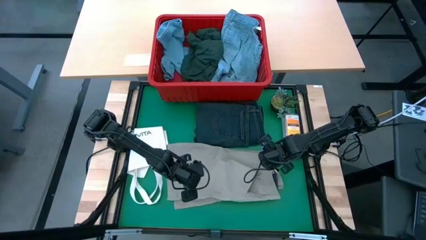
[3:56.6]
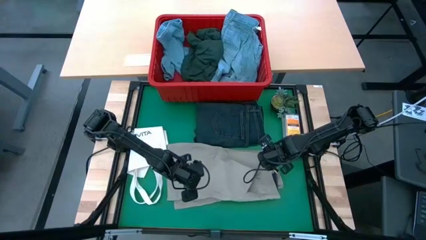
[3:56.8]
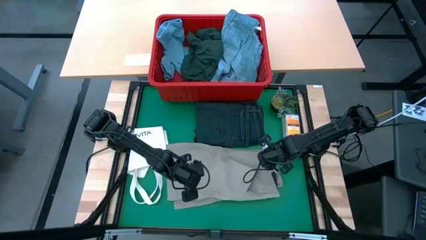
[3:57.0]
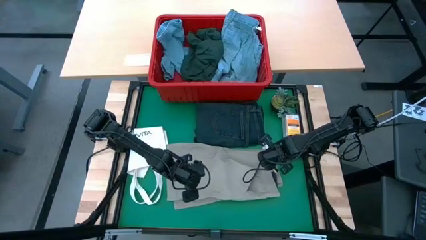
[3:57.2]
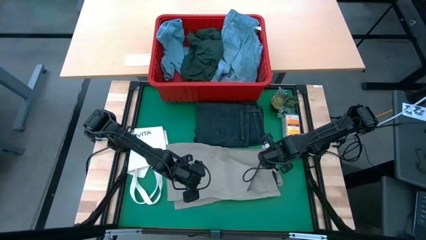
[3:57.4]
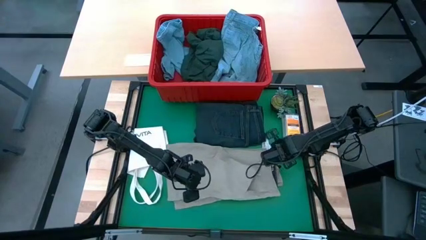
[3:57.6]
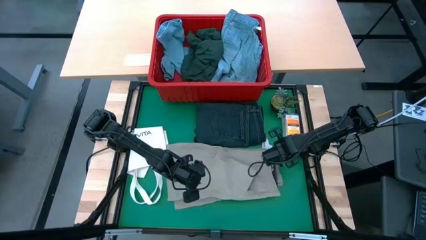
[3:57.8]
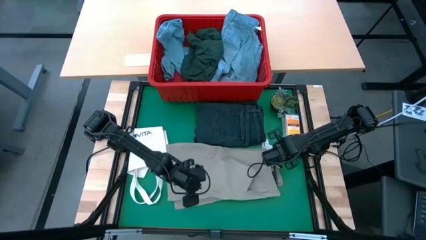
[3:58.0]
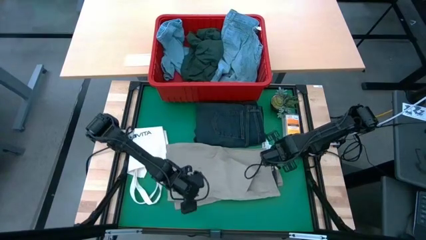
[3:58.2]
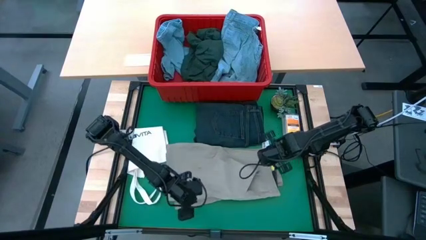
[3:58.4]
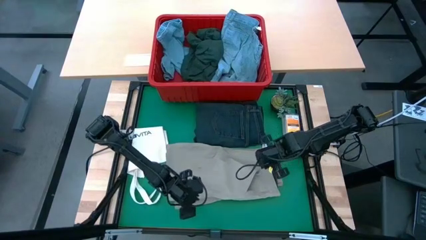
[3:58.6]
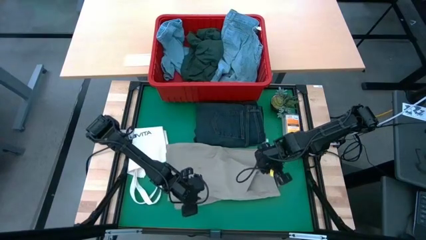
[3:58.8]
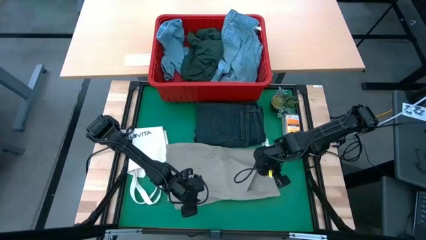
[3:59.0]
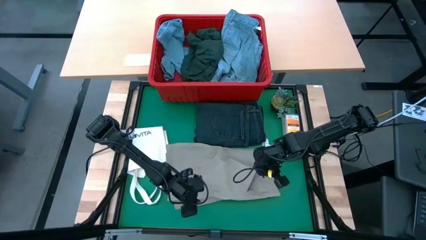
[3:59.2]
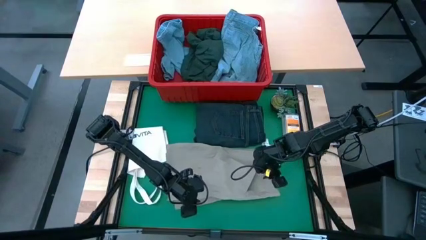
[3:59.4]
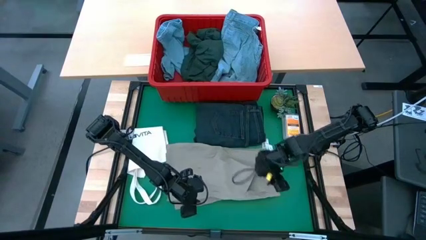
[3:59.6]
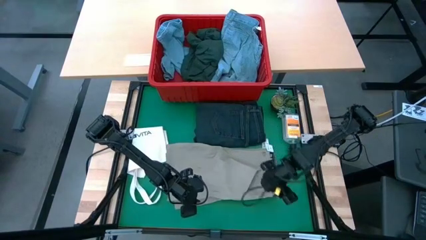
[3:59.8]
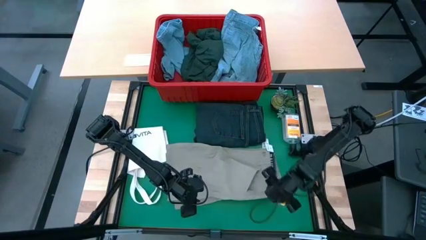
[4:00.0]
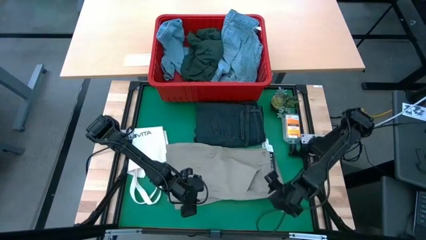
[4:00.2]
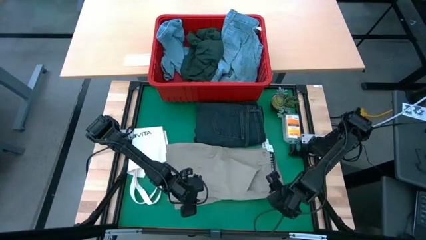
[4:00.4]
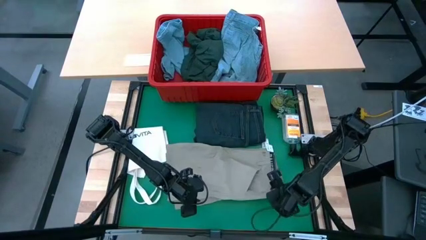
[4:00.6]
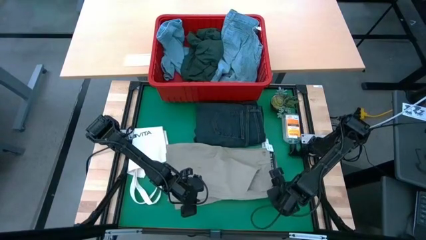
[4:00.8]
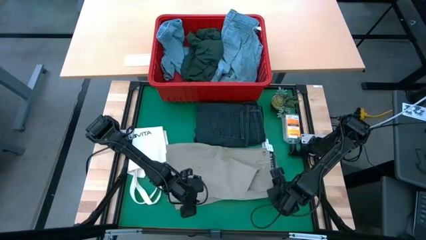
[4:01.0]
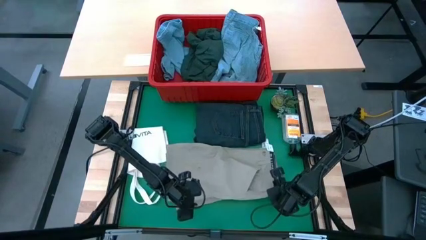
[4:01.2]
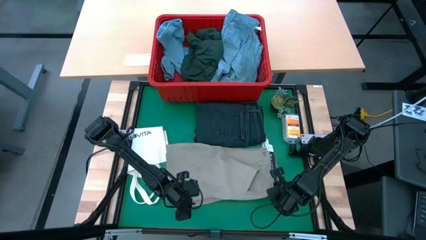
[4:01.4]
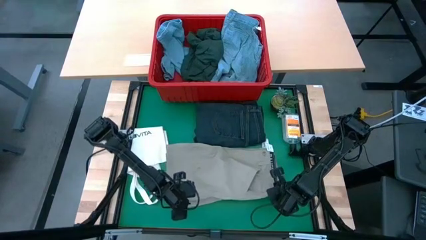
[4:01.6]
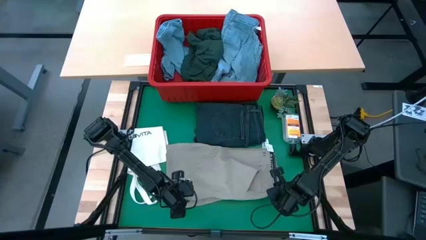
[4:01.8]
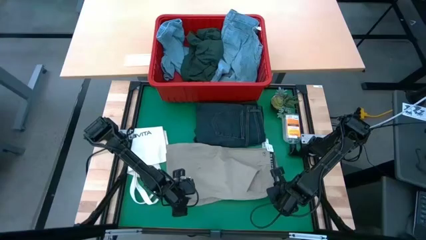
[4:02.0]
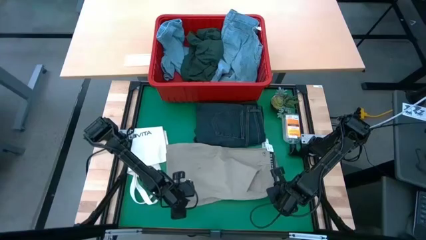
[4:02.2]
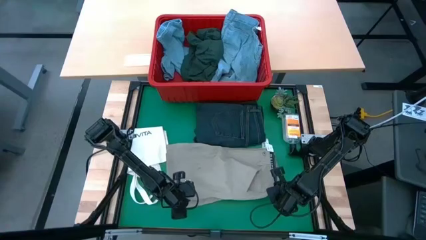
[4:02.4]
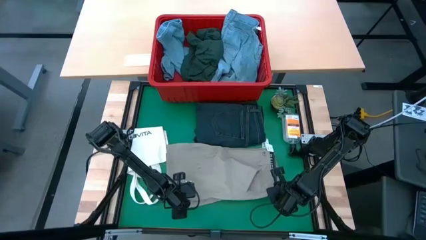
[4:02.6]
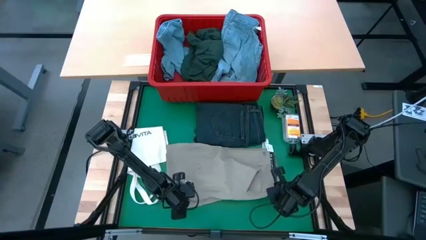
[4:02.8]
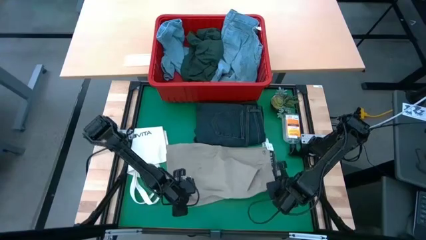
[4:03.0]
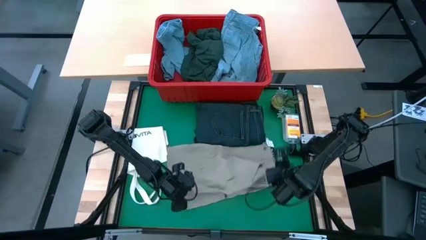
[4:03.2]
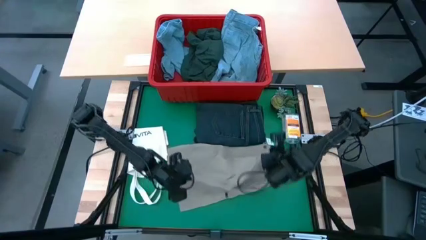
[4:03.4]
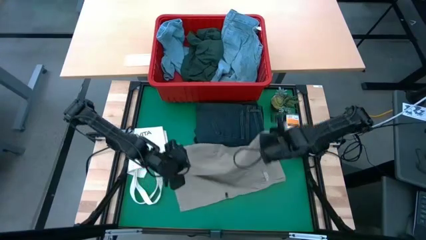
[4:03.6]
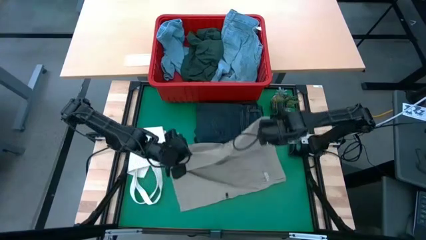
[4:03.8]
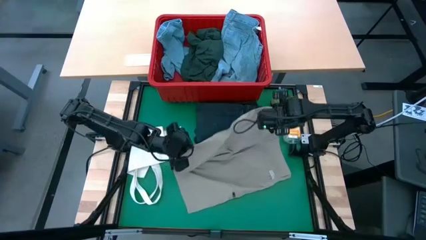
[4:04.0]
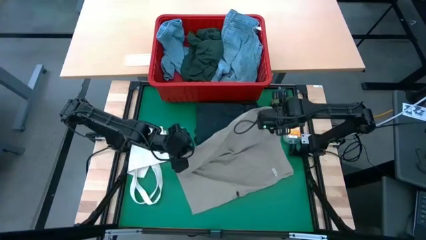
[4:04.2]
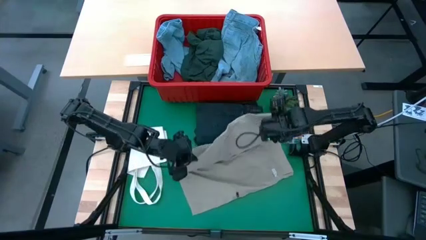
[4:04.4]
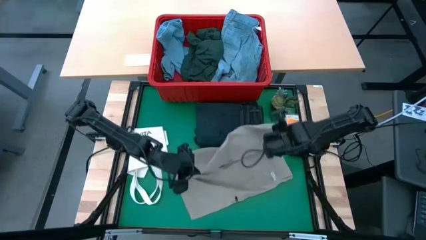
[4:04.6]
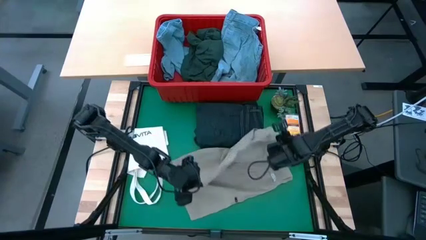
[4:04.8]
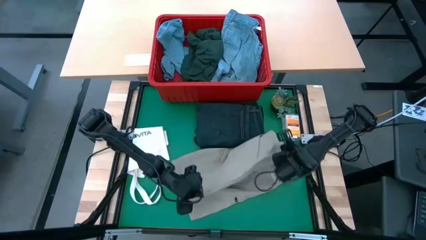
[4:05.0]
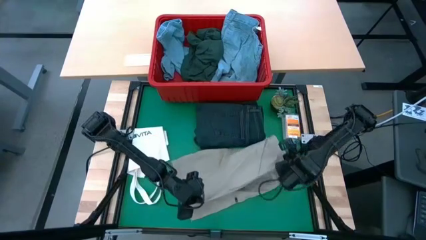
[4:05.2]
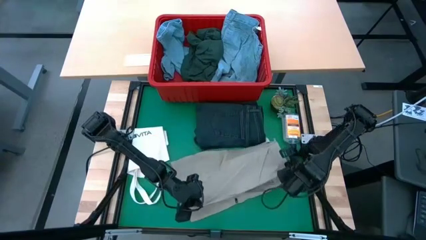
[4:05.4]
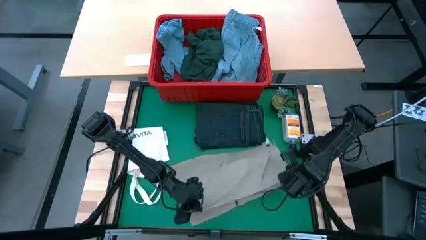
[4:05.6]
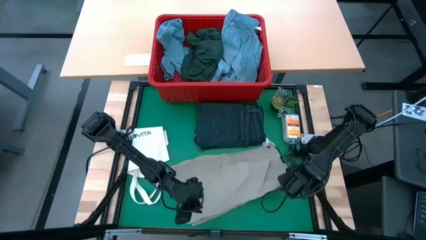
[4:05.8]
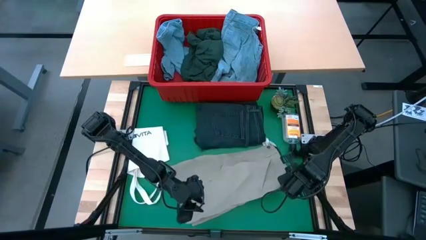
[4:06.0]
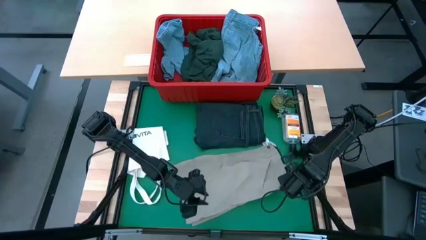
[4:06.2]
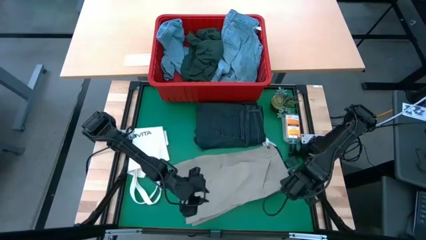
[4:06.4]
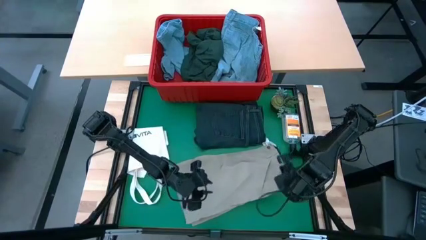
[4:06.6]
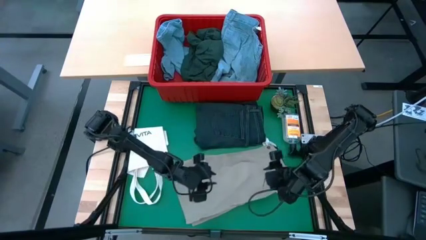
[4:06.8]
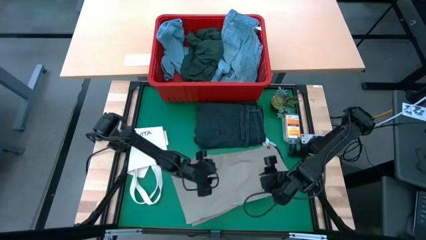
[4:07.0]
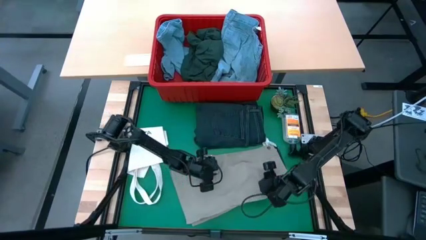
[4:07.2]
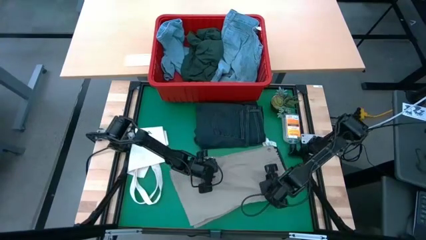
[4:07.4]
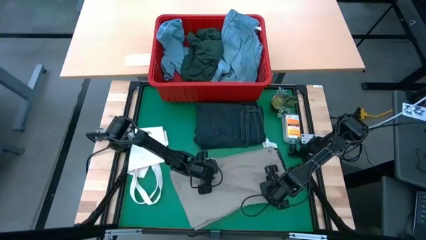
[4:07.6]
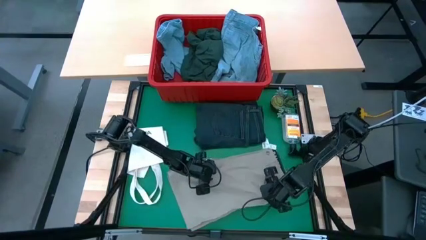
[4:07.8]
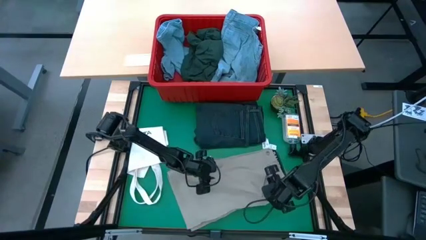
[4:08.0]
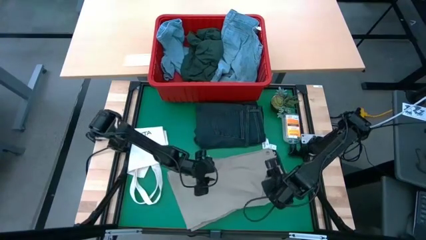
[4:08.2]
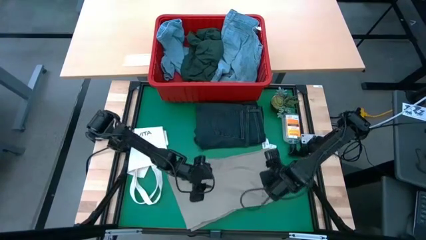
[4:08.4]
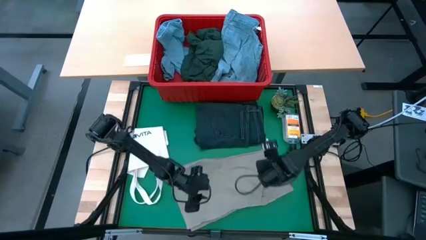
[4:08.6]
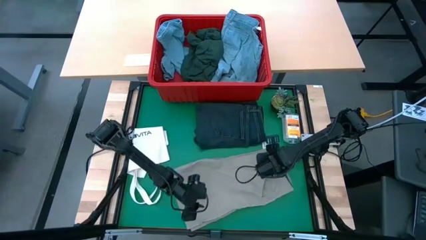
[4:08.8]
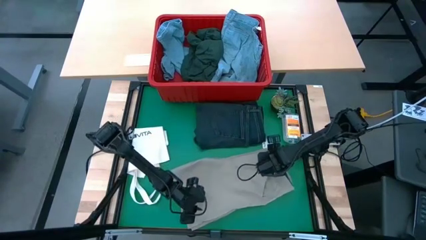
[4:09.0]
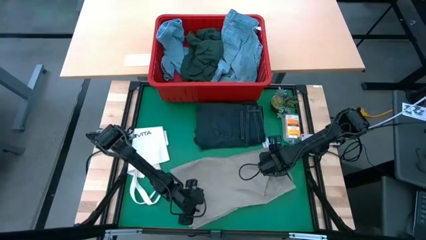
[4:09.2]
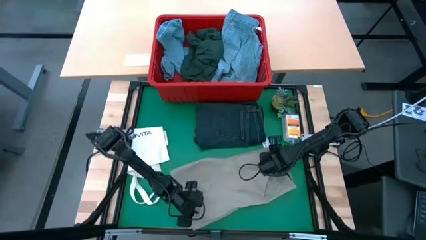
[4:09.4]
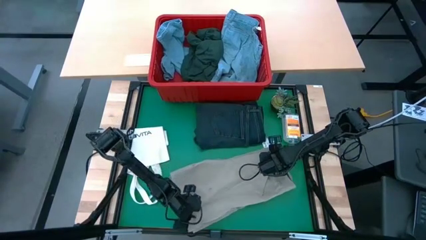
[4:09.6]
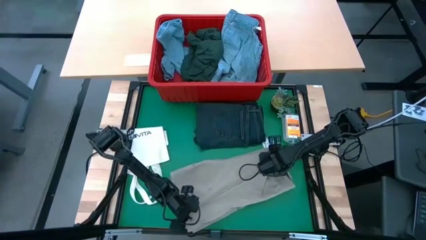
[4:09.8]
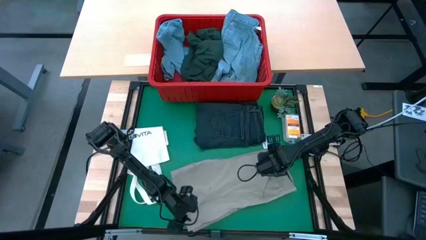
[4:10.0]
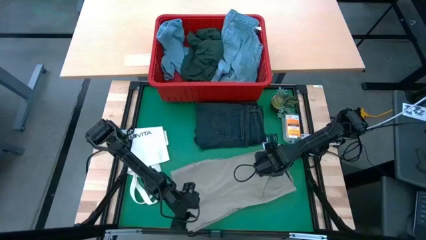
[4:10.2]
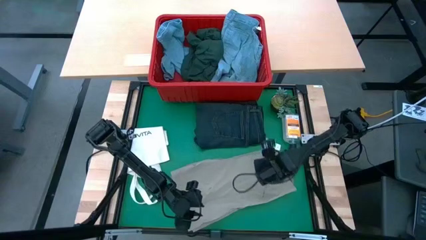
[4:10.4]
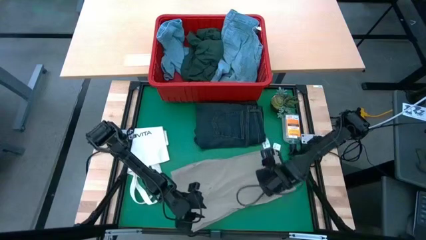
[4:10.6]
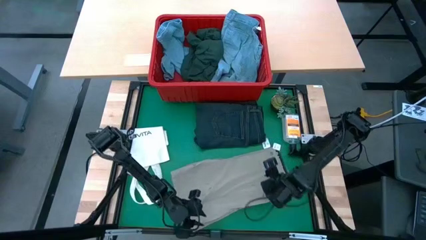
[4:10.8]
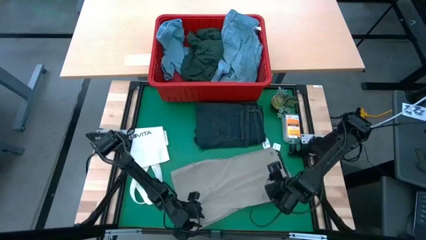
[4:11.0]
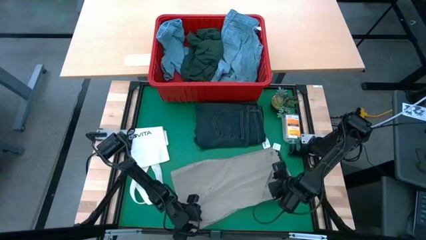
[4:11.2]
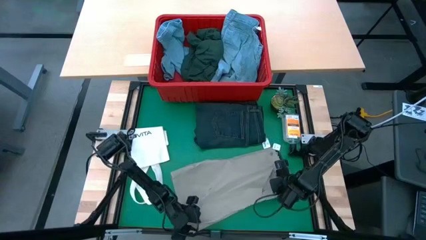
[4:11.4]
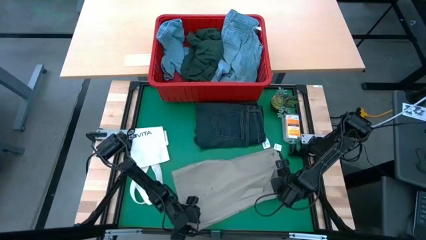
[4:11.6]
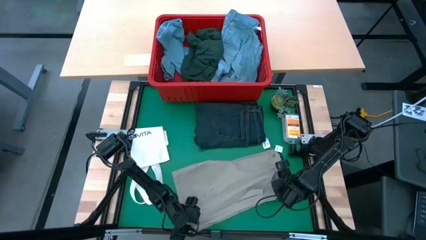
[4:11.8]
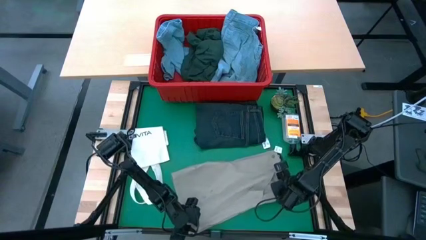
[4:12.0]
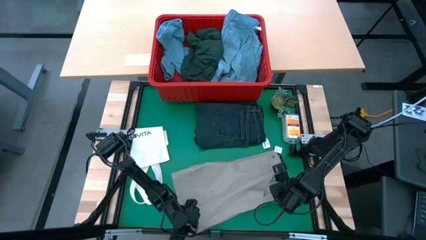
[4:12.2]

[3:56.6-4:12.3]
Task: Fold laundry
Fold the brown shorts

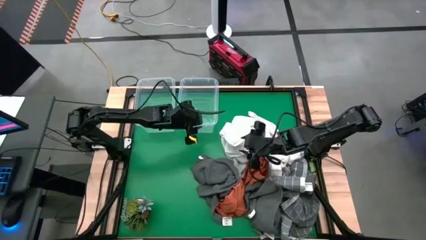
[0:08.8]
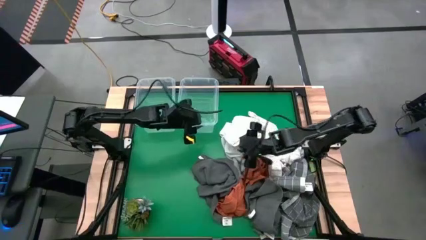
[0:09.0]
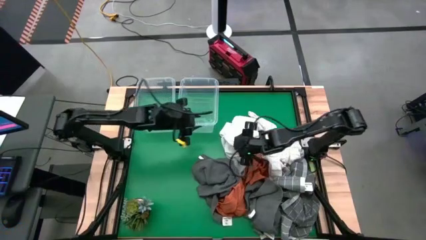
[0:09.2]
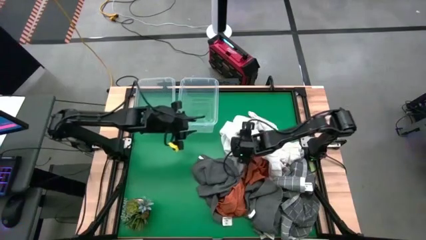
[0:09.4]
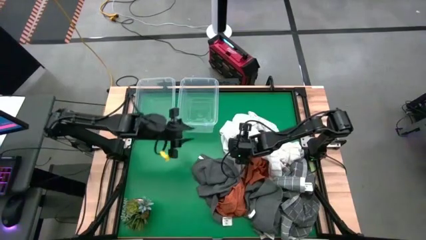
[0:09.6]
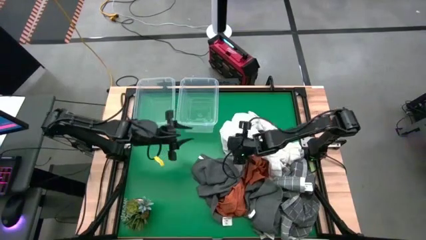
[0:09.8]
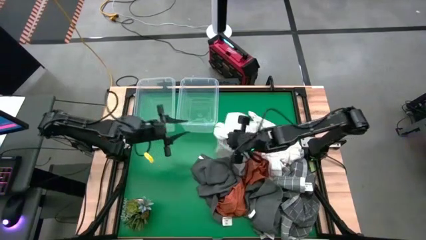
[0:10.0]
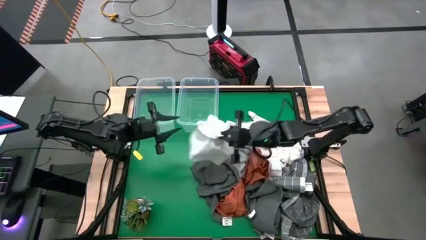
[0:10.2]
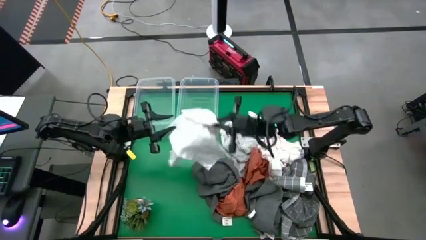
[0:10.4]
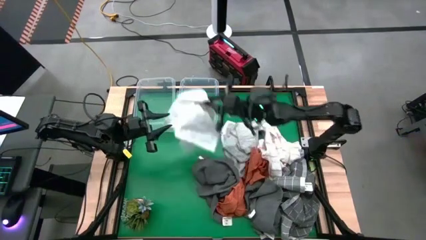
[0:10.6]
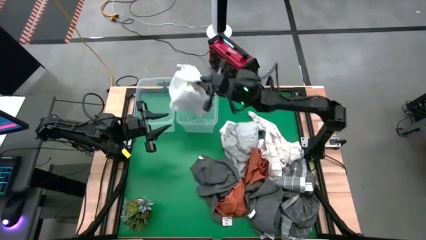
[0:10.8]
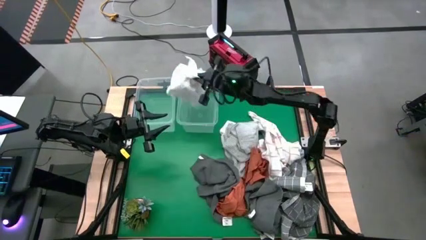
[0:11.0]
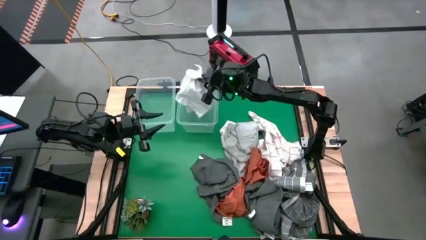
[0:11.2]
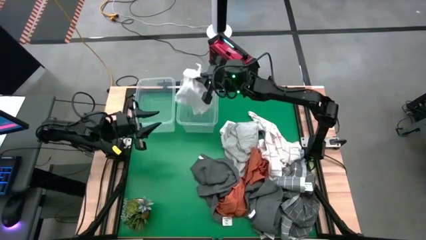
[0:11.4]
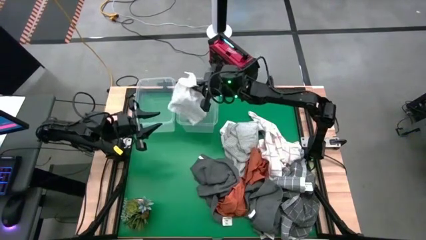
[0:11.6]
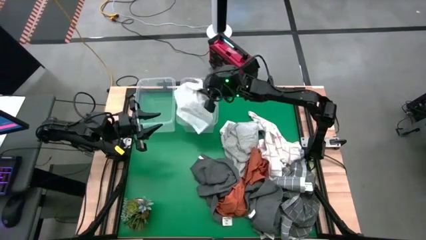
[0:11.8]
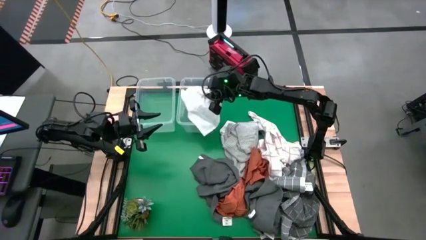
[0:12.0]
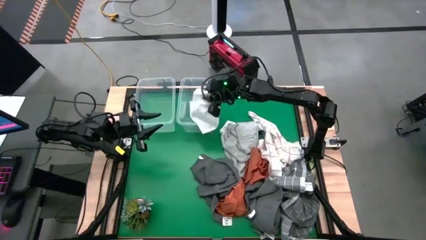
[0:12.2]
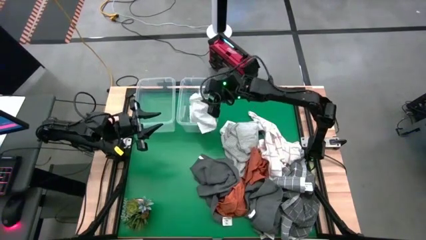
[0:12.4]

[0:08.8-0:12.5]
Task: Sort towels by color in basket
Put the white towel into the right transparent bin
